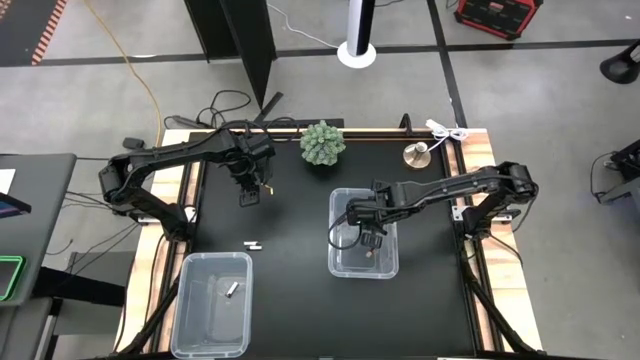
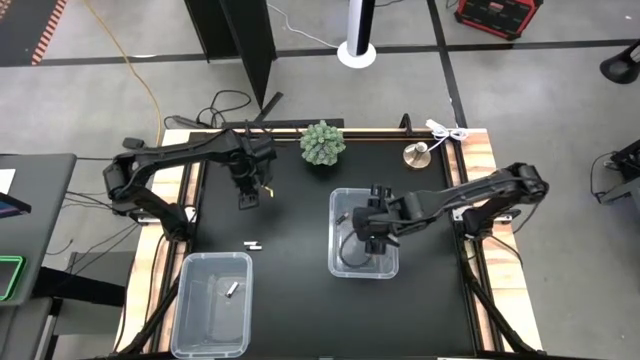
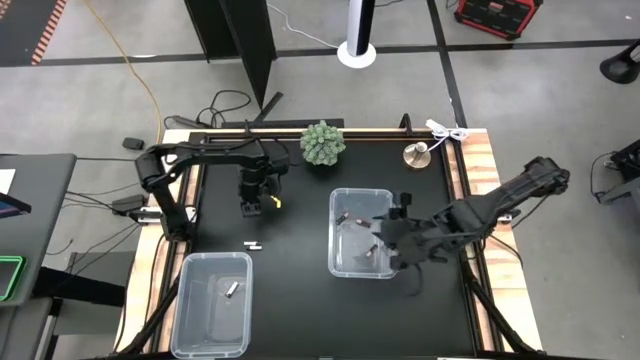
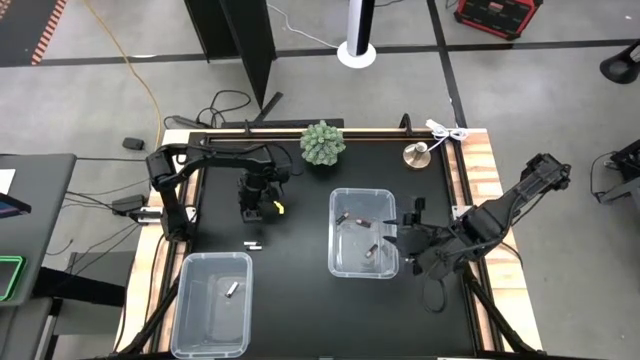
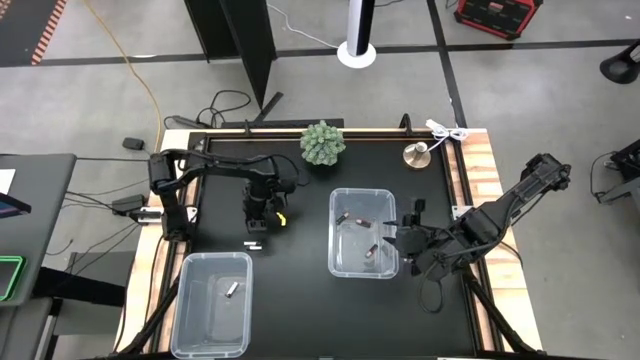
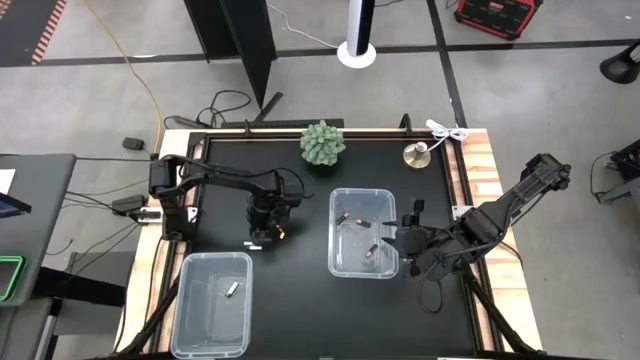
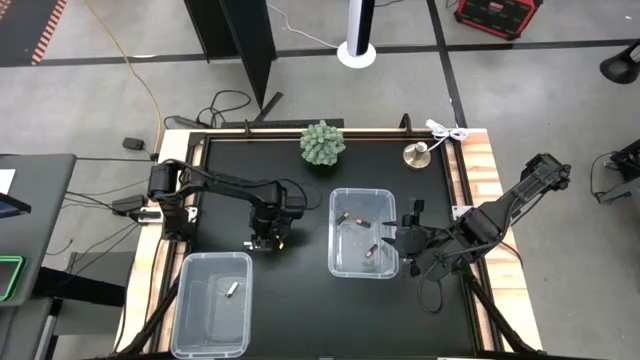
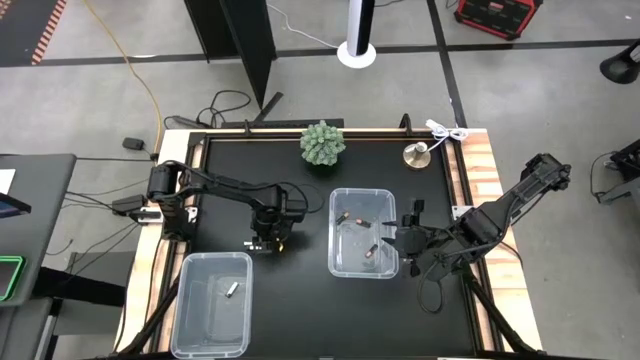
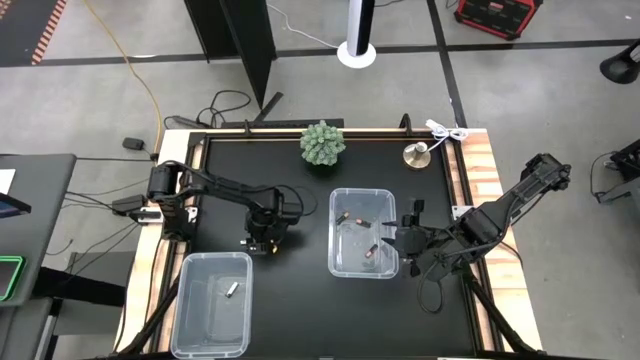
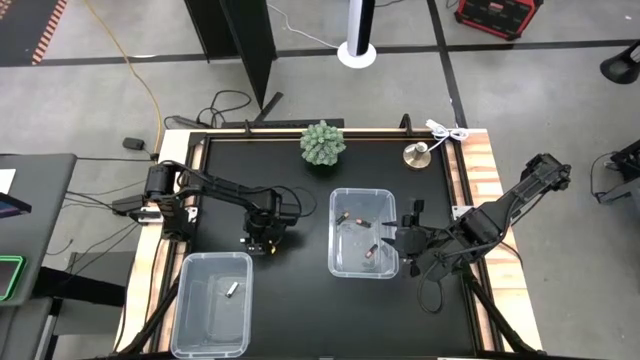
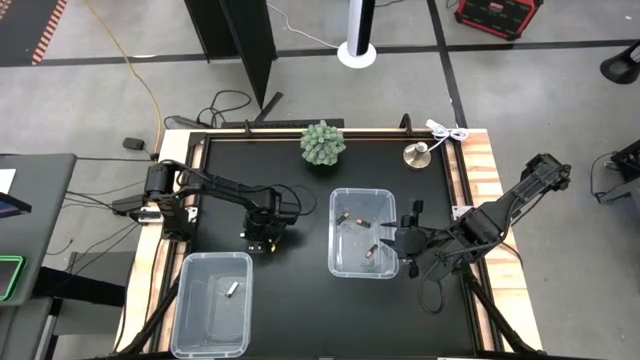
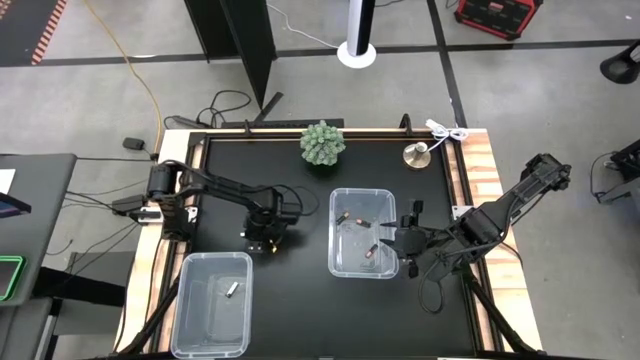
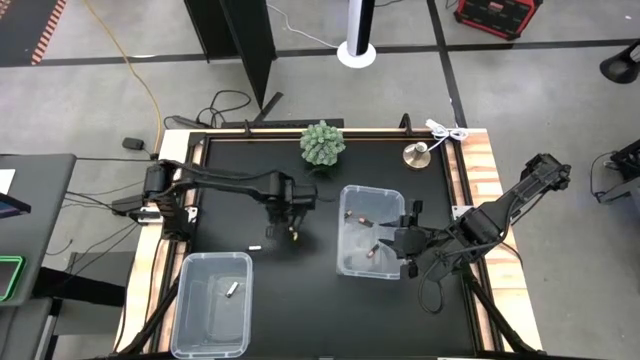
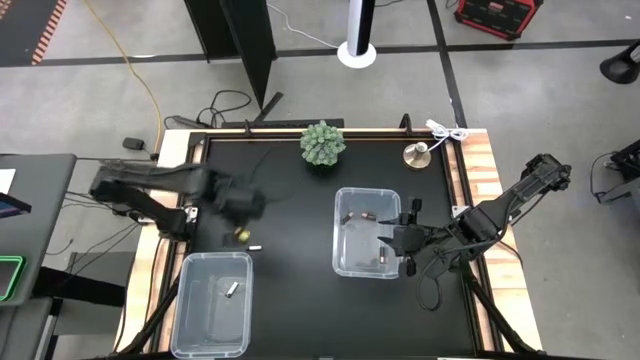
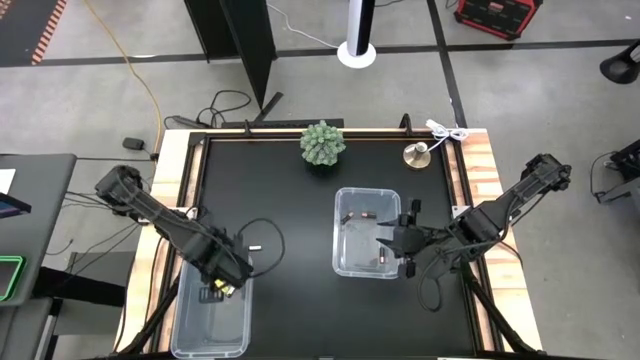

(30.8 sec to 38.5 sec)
Task: Sort batteries
Put the top white battery into the bottom transparent bin

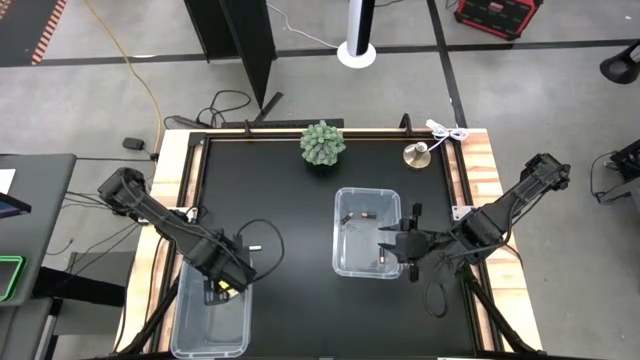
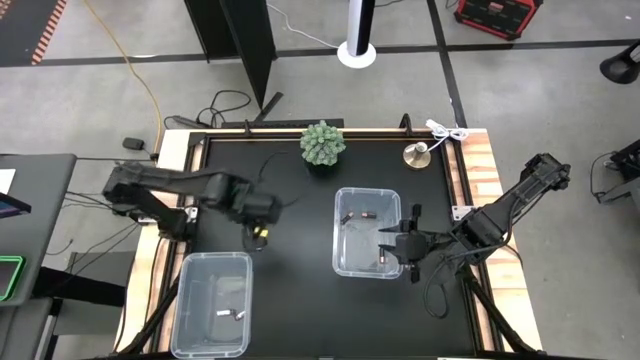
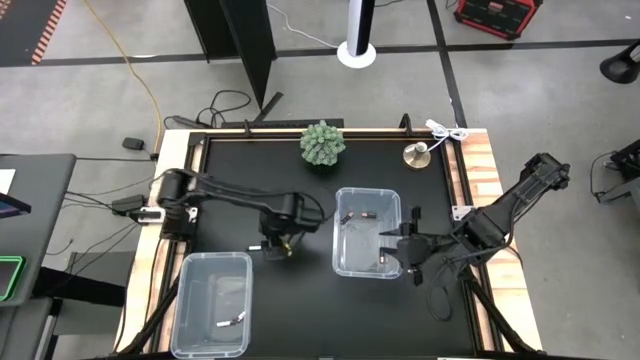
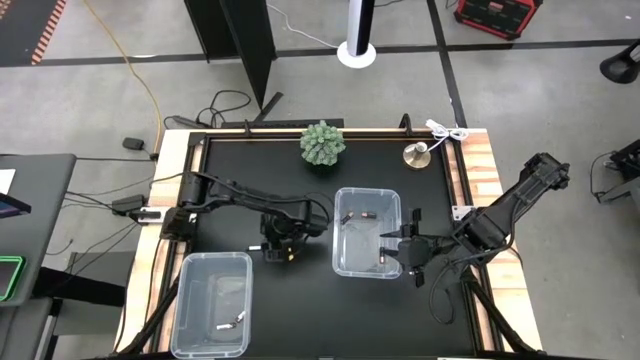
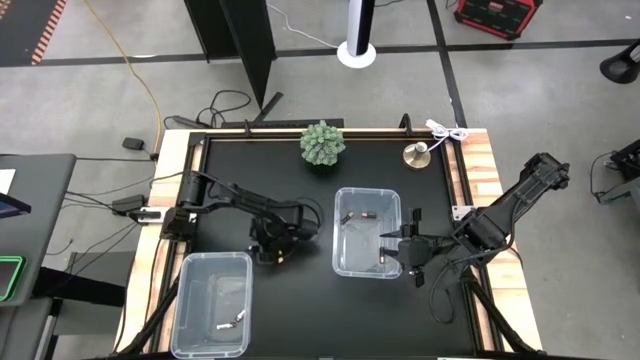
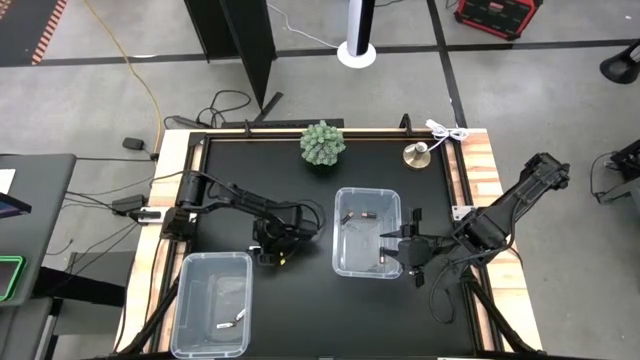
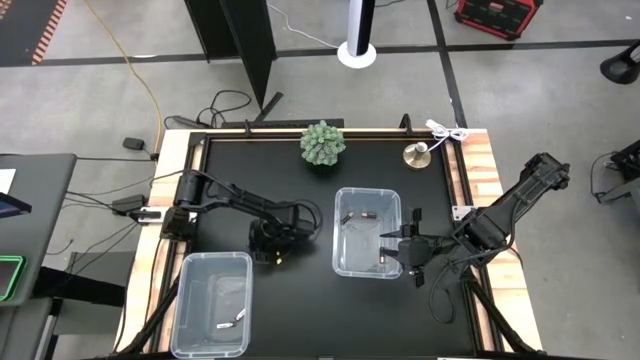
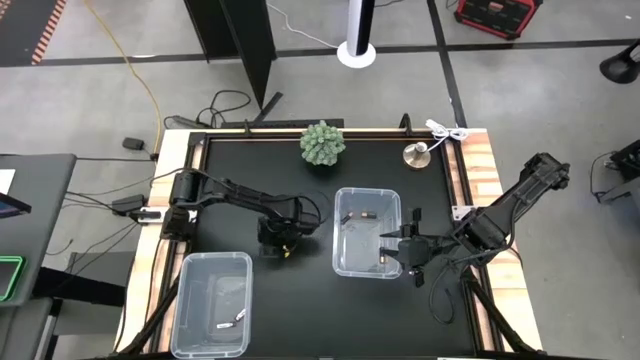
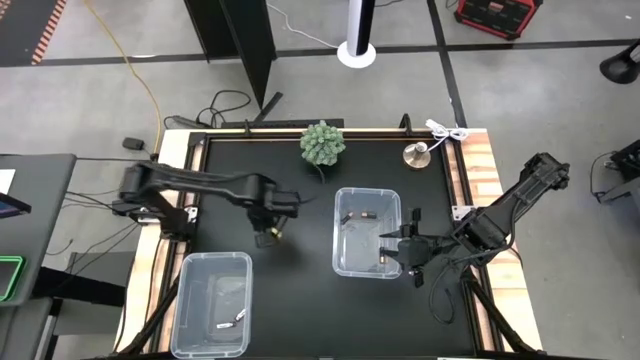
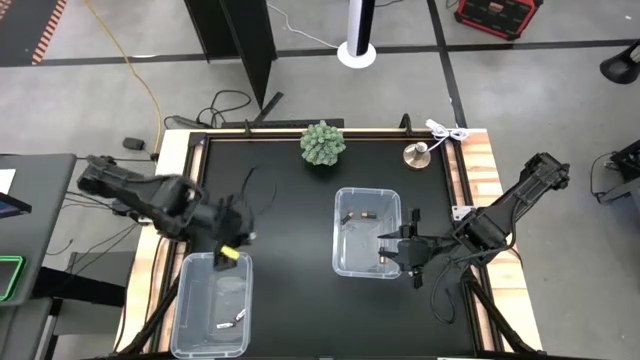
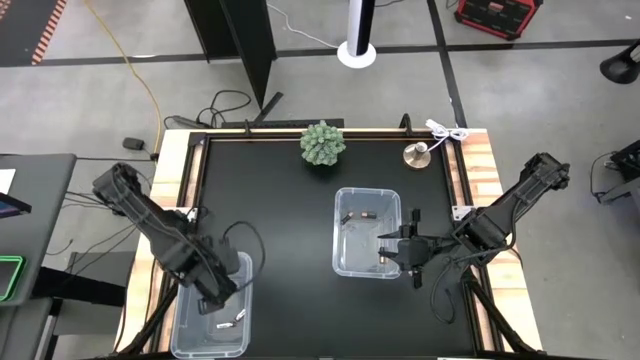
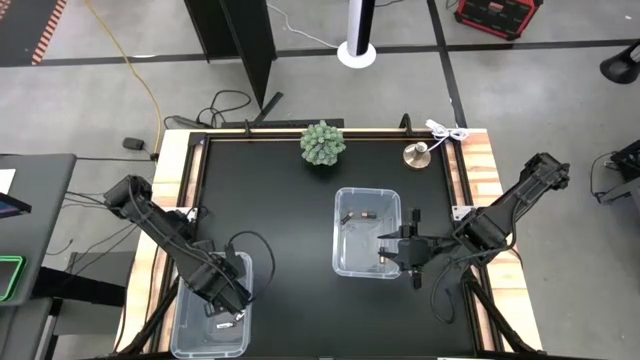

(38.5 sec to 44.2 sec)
Put the white battery into the bottom transparent bin

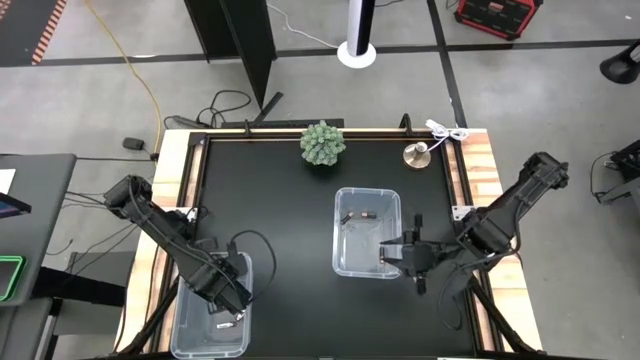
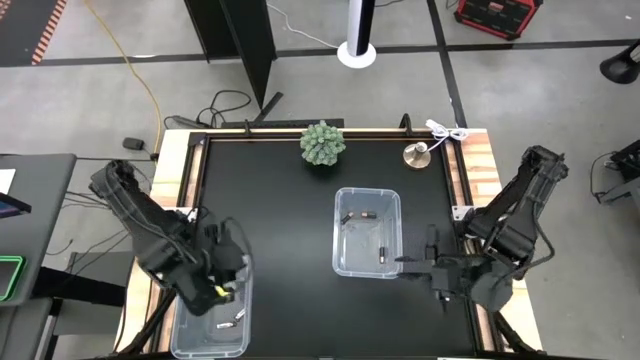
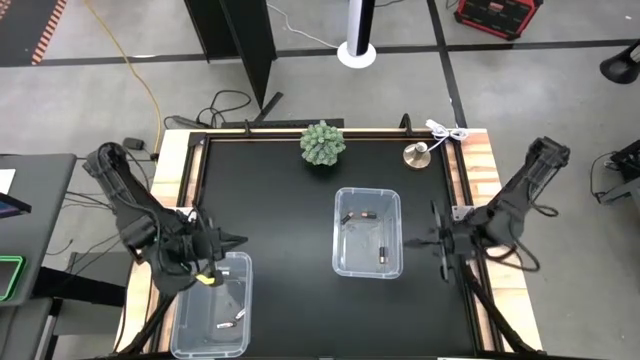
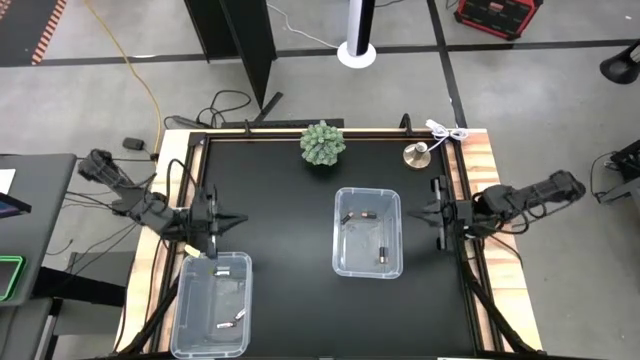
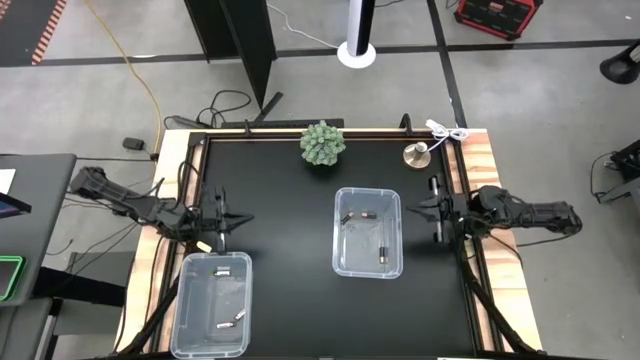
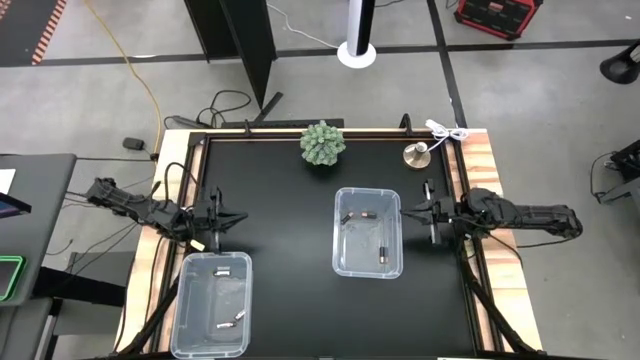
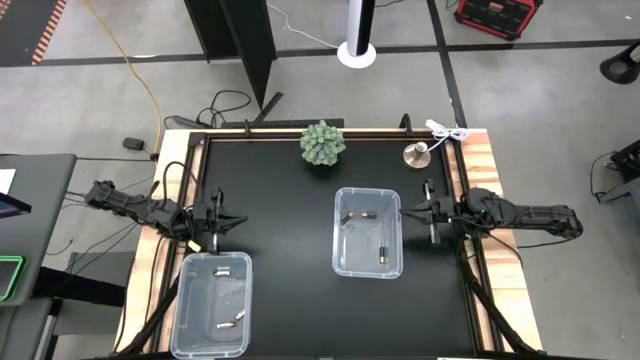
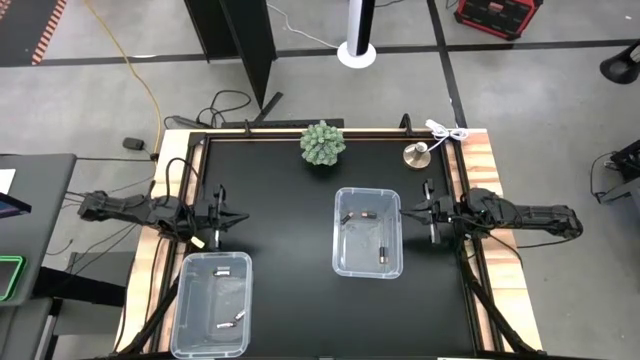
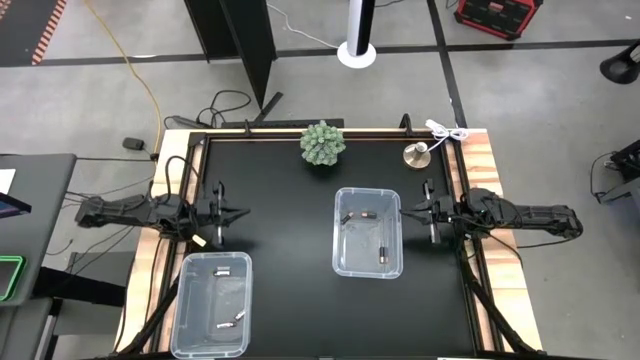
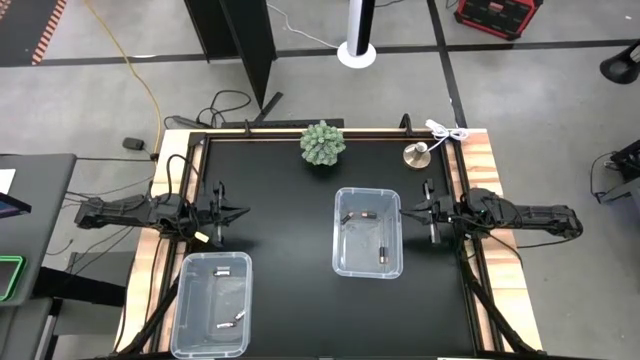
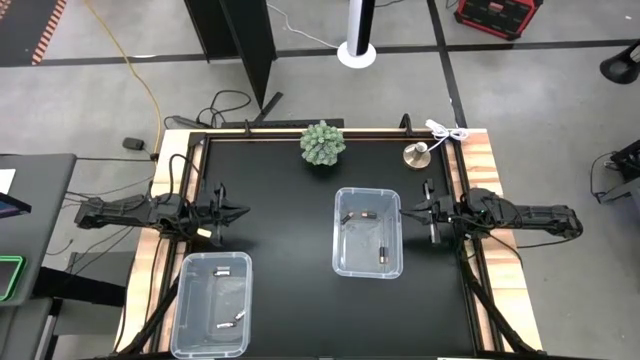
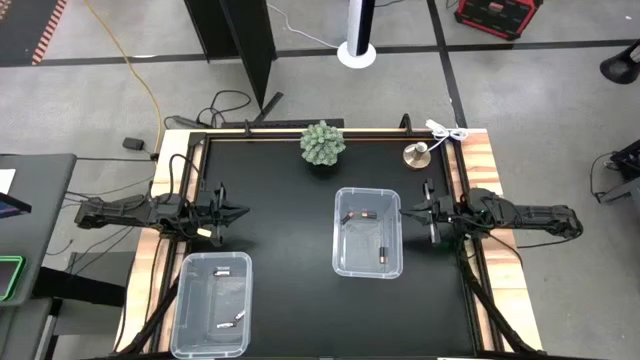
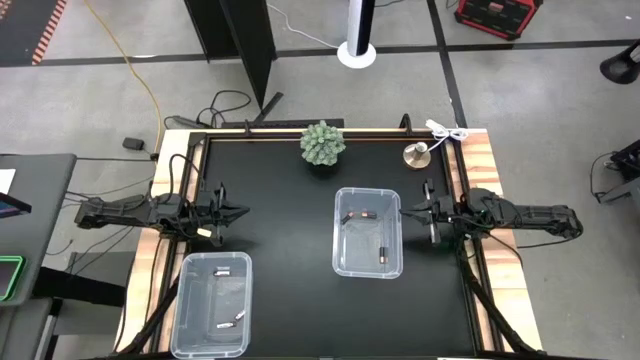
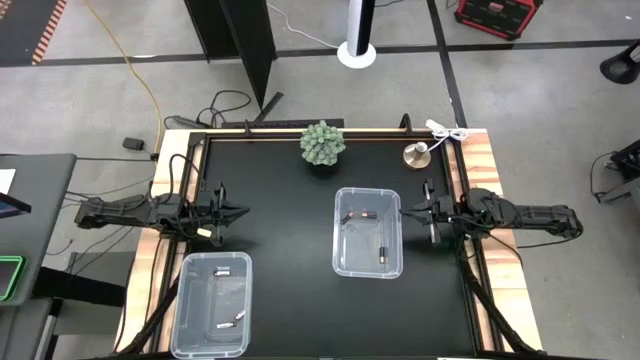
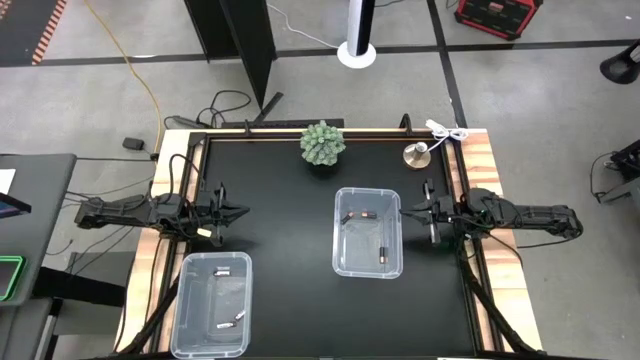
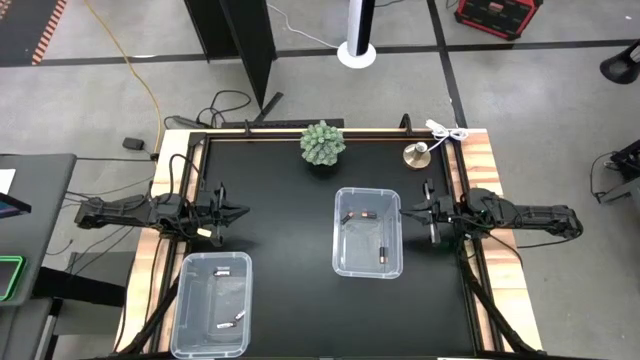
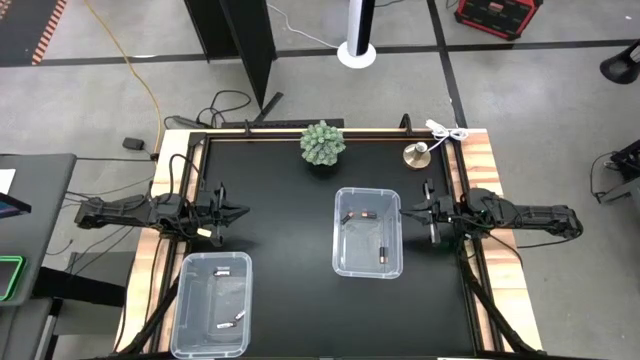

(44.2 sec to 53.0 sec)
Return to Home Position
